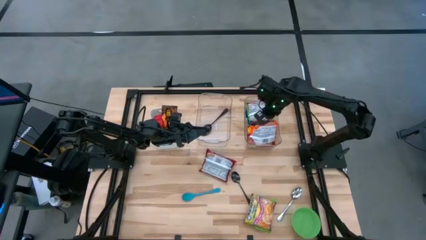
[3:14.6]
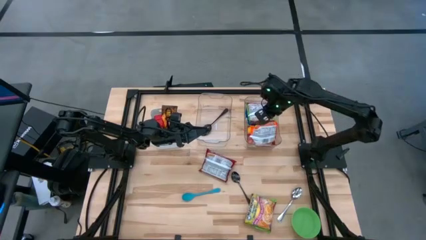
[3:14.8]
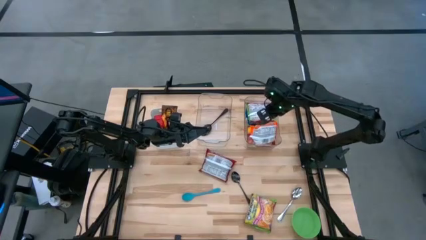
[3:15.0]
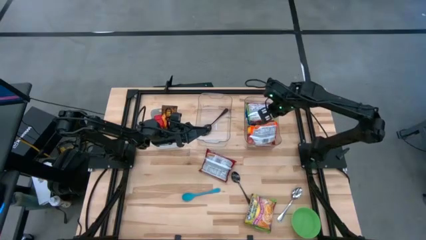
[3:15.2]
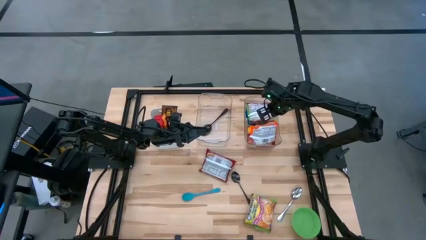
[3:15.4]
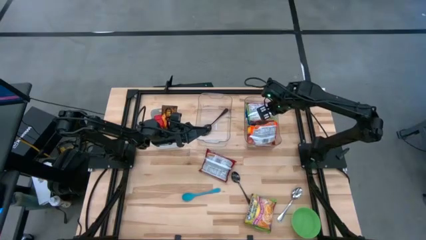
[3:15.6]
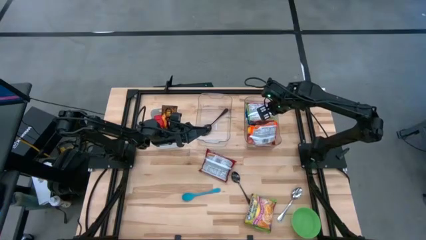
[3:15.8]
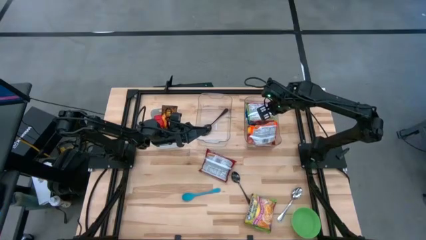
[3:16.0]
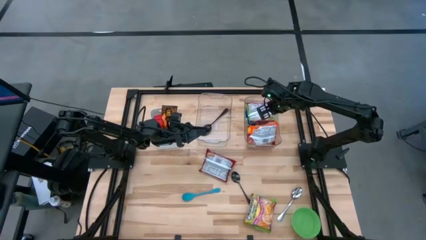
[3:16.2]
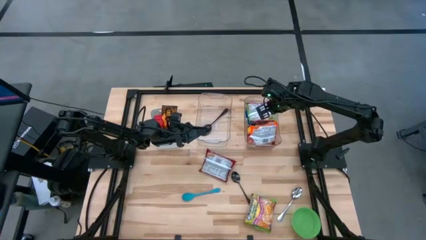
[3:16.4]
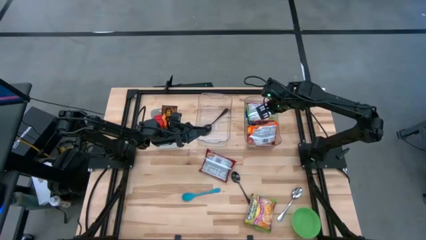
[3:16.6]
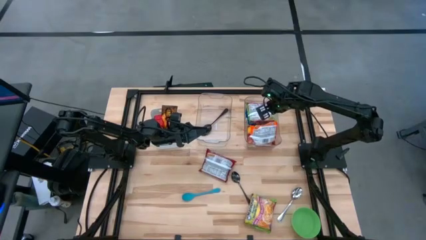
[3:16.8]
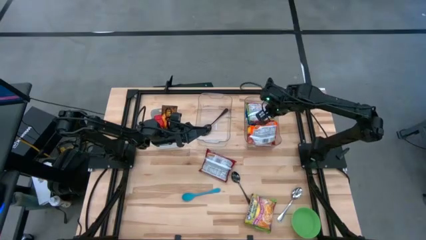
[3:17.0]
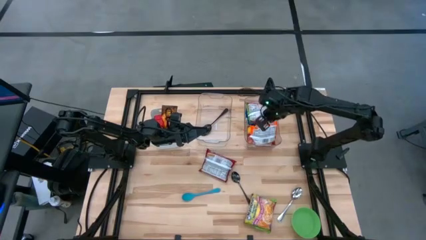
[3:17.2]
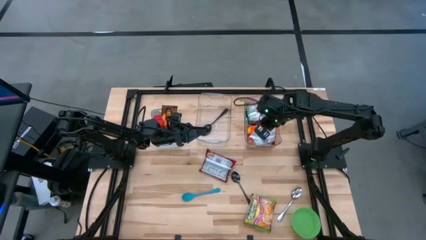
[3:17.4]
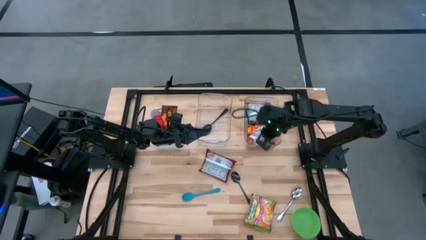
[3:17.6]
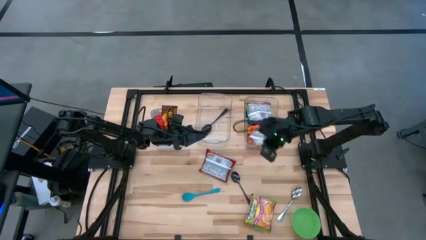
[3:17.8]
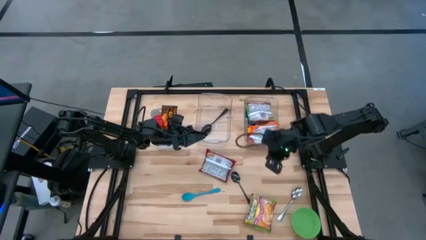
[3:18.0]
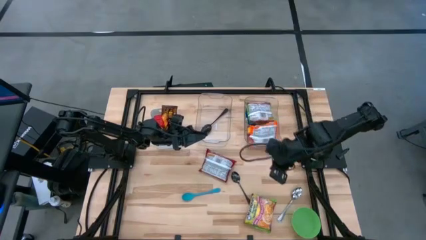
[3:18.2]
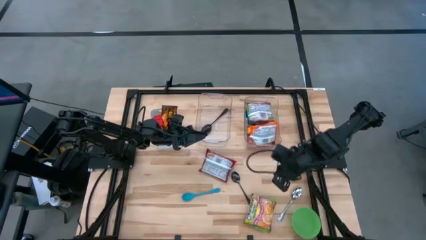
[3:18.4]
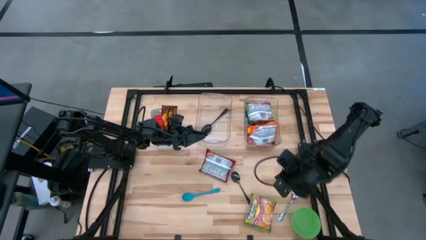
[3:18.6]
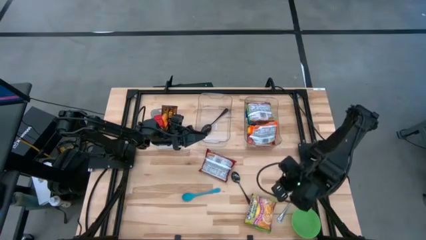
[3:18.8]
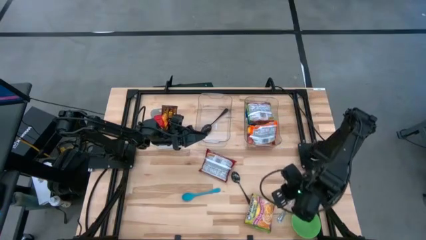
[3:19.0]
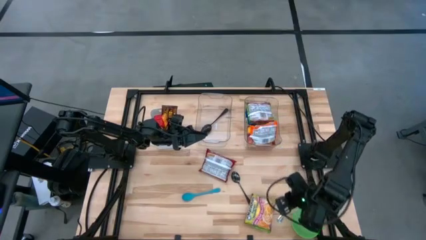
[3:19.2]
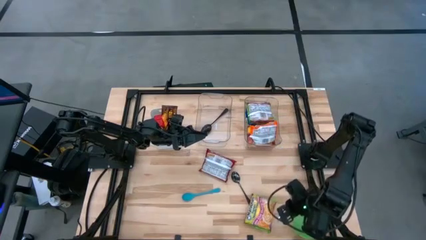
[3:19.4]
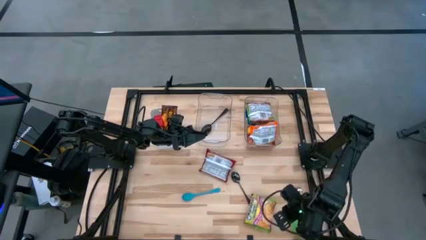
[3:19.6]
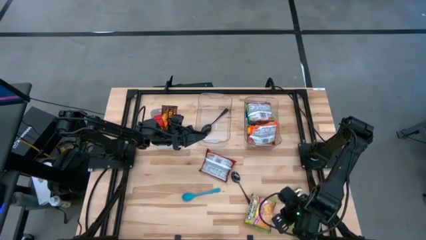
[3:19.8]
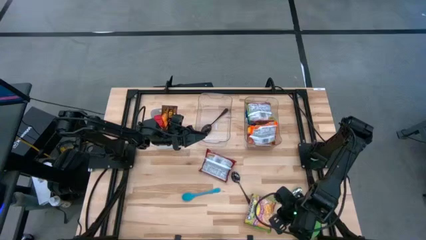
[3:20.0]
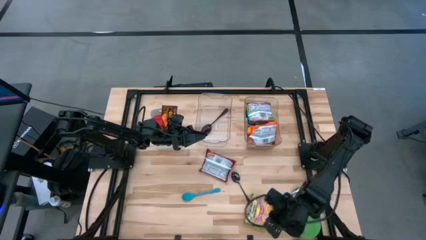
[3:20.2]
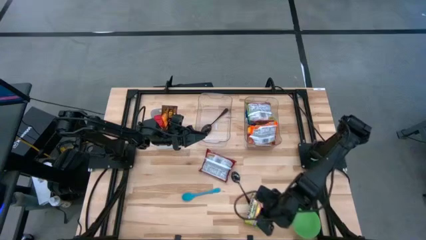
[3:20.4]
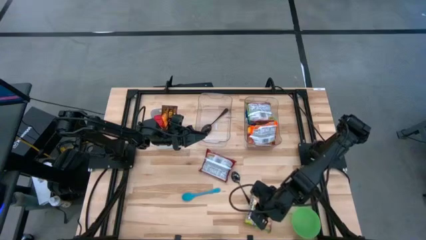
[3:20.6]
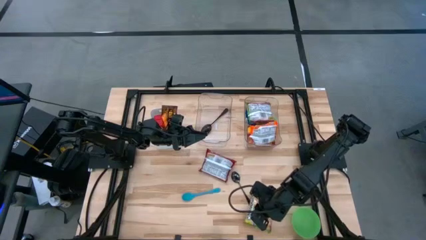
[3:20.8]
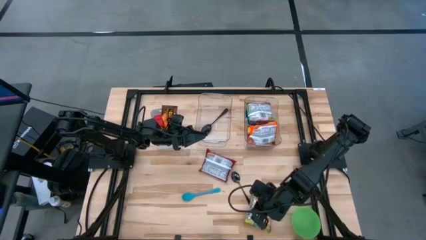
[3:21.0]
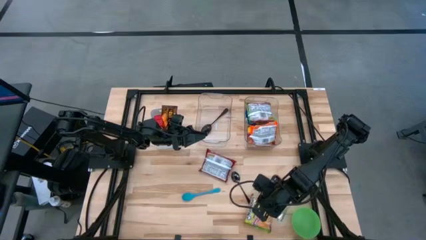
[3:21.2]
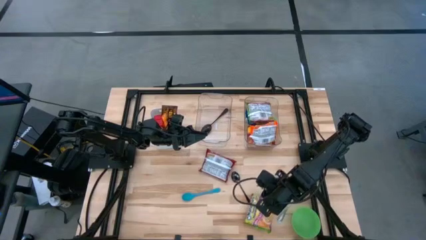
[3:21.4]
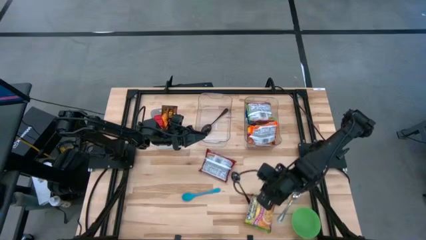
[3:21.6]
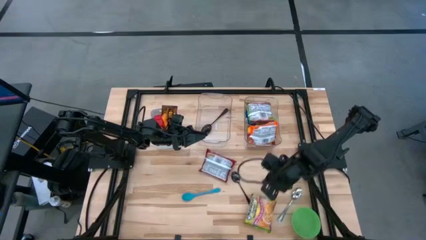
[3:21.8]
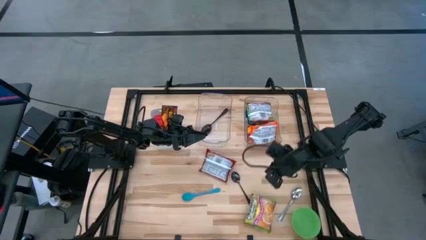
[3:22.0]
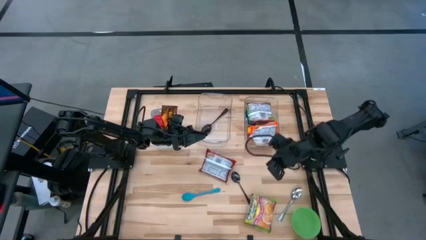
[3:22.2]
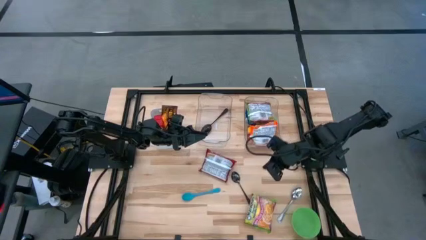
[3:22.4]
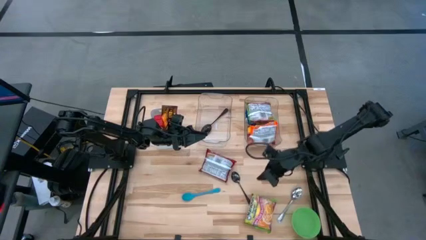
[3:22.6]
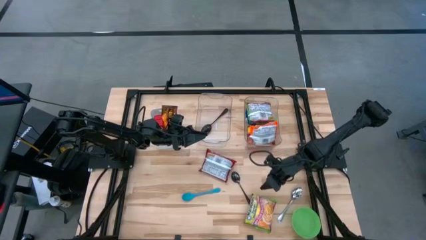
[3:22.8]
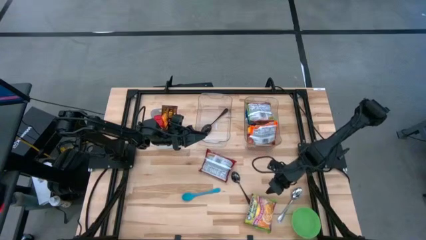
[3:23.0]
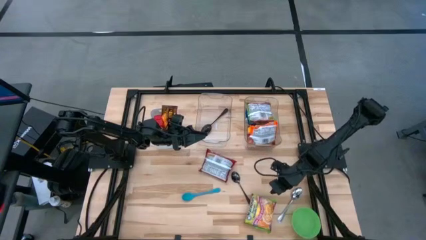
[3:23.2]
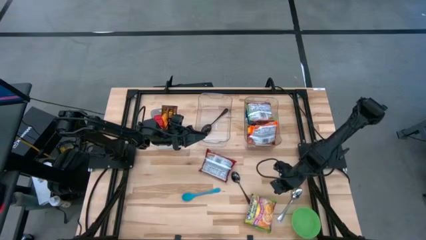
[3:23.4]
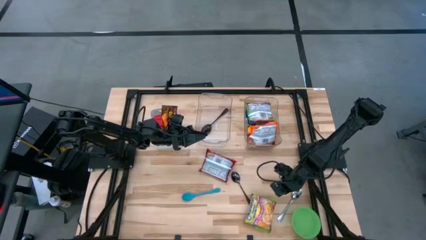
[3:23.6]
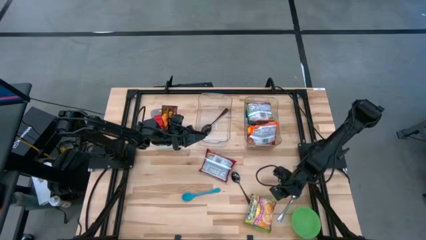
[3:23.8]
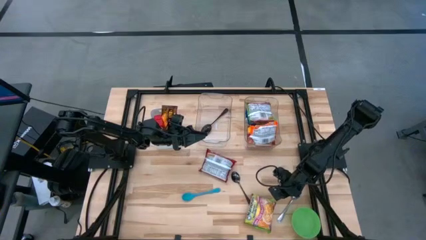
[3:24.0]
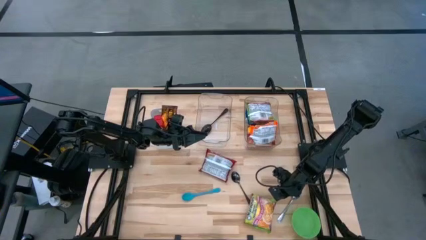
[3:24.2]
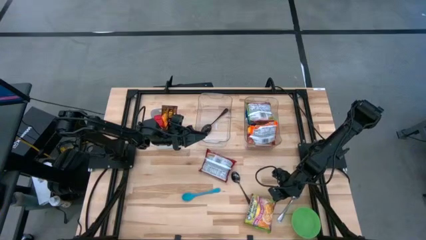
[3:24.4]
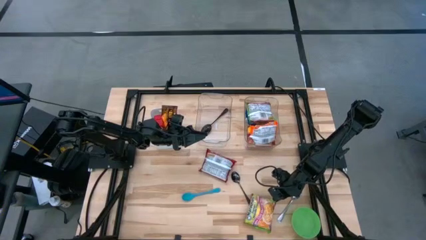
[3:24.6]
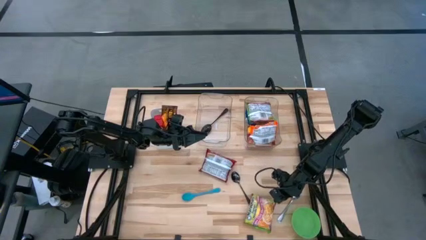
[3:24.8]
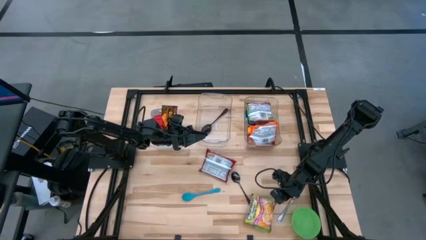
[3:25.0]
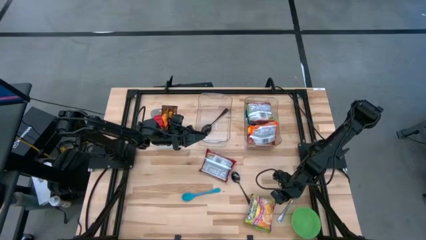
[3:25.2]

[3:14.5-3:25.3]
Task: Pick & Place Food Item
Put the green noodle pack into the right transparent bin
